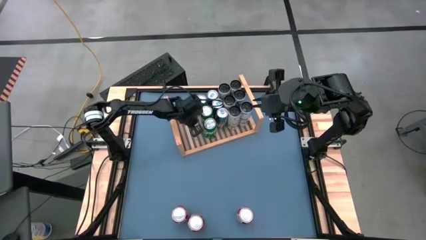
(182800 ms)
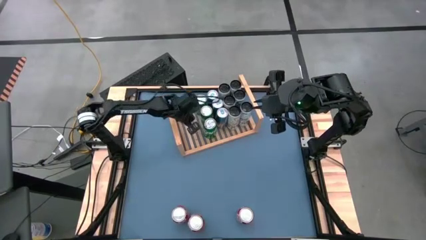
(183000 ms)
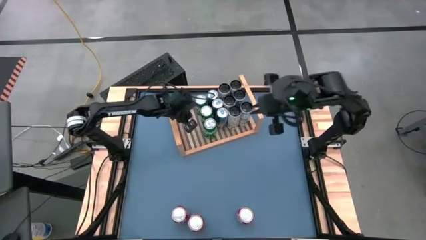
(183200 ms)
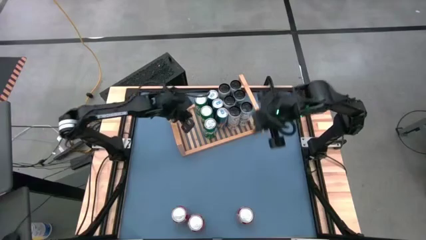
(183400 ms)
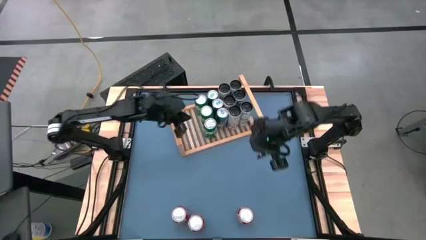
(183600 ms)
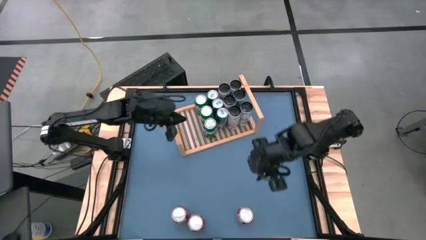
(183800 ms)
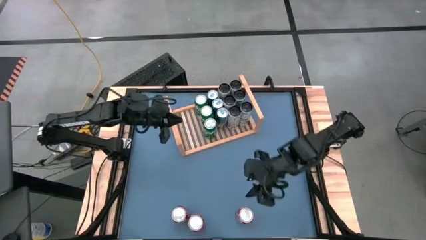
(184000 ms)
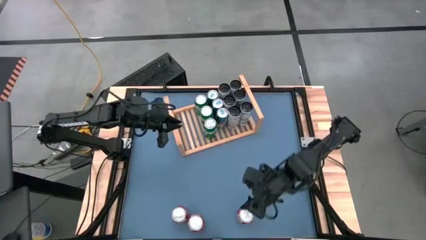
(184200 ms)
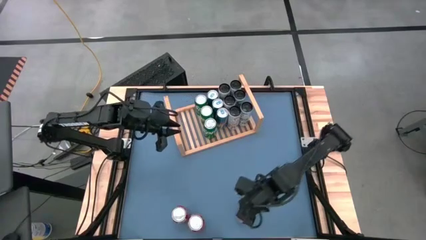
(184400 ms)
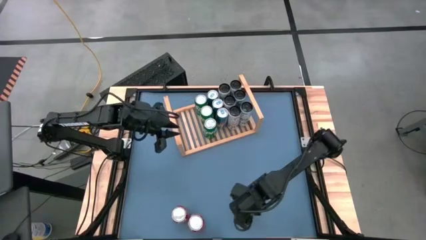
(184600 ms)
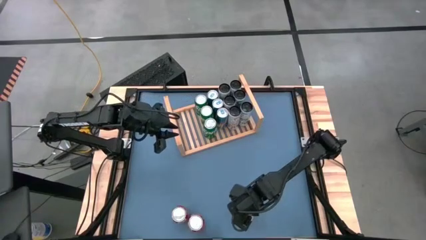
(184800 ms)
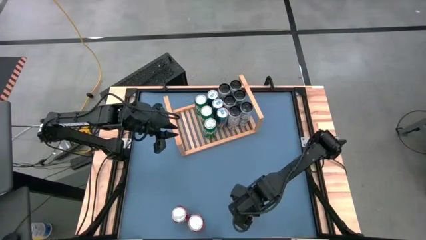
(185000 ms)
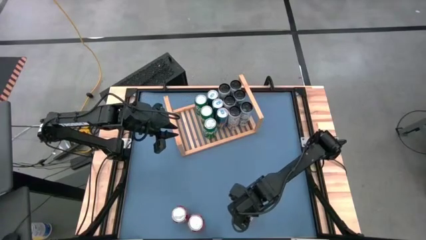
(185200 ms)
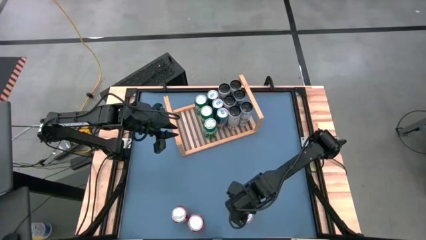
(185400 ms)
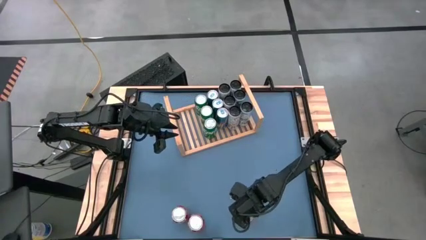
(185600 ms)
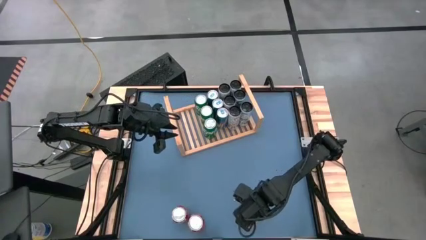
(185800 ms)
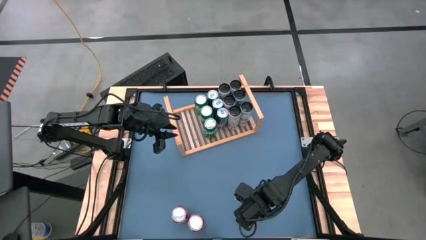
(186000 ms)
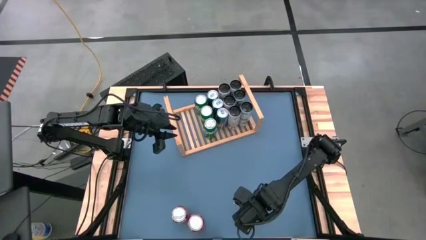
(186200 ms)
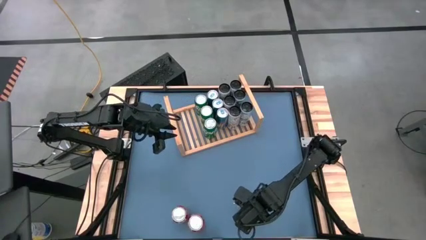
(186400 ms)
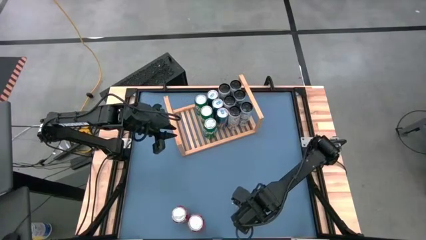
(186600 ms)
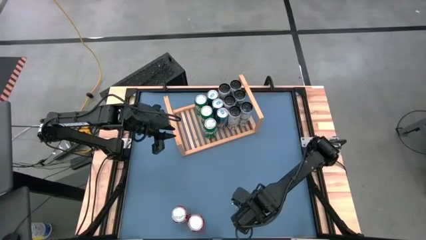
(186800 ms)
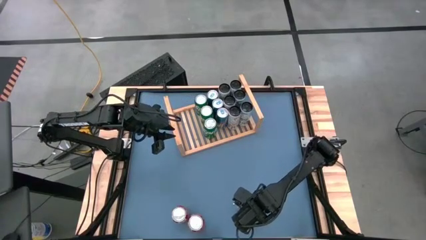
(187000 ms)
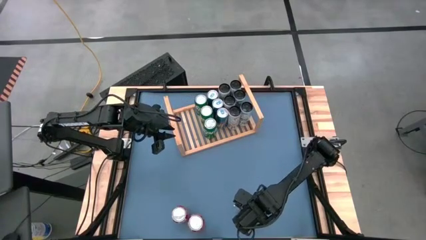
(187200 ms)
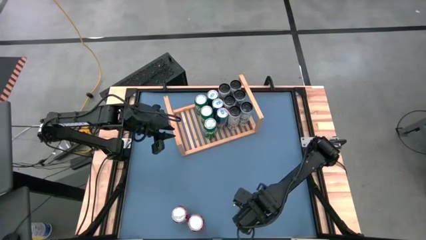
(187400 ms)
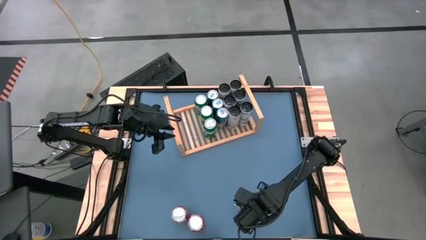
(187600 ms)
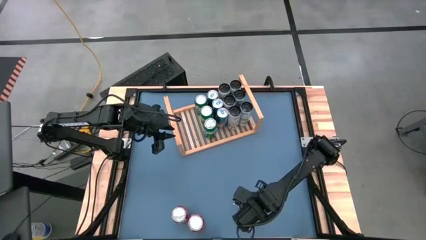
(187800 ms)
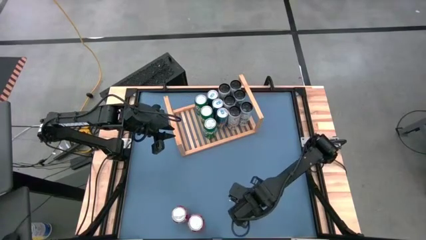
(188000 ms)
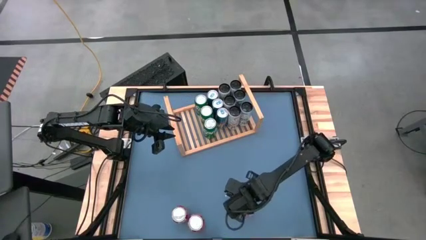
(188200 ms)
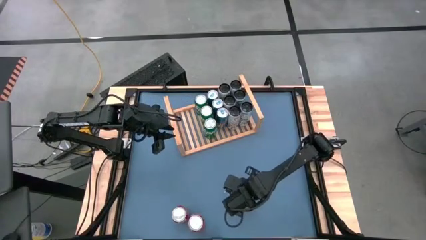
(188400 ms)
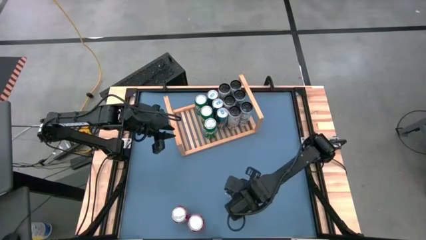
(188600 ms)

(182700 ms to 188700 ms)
Task: Place canned beverage on shelf
Put the red-white soda can on the shelf

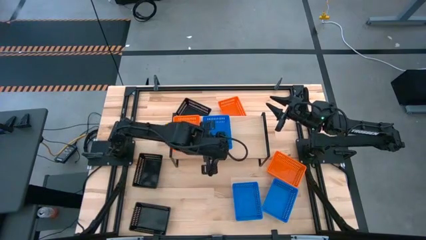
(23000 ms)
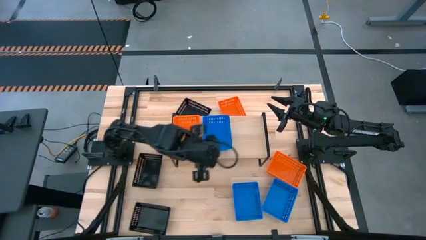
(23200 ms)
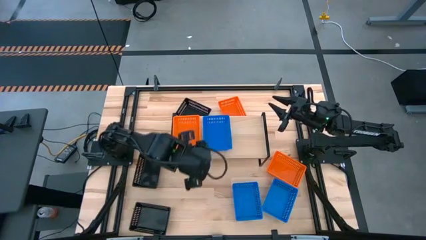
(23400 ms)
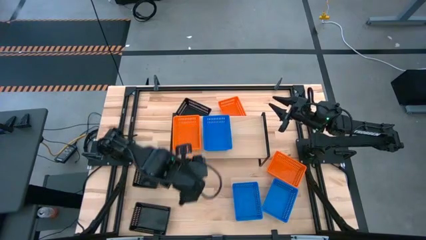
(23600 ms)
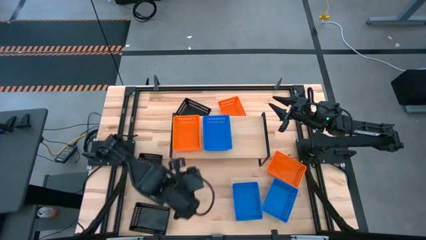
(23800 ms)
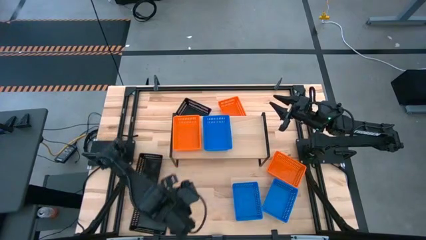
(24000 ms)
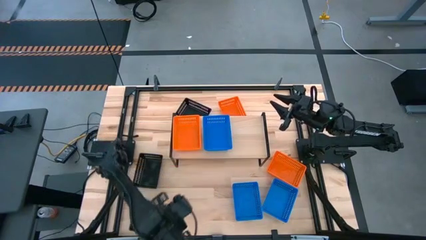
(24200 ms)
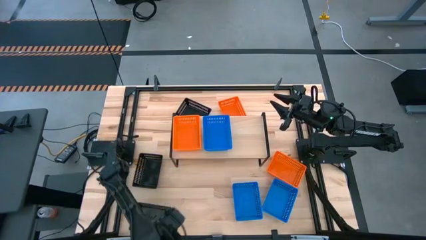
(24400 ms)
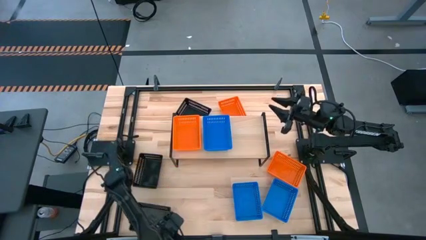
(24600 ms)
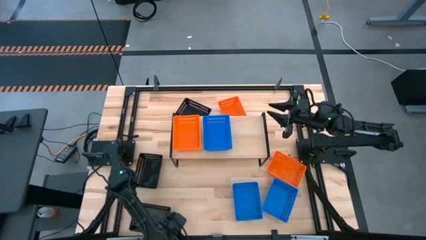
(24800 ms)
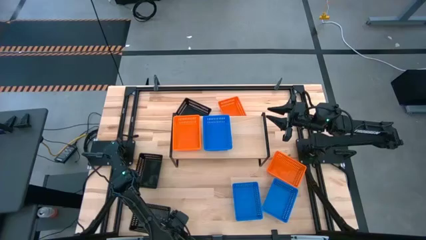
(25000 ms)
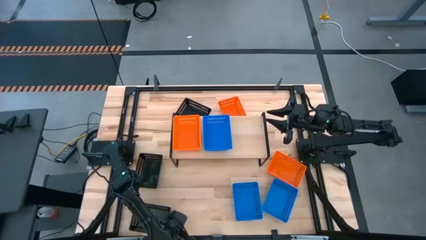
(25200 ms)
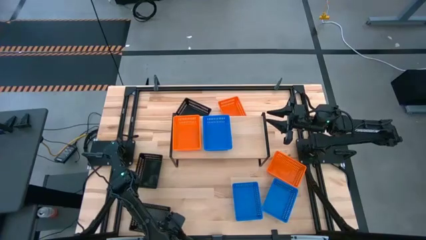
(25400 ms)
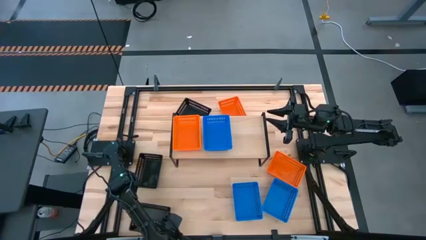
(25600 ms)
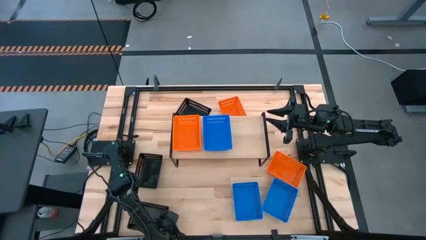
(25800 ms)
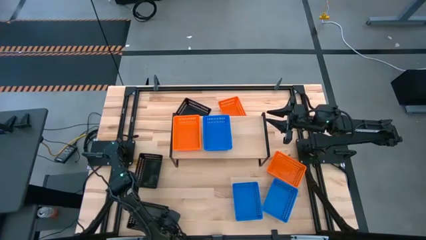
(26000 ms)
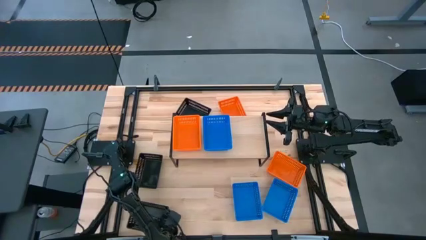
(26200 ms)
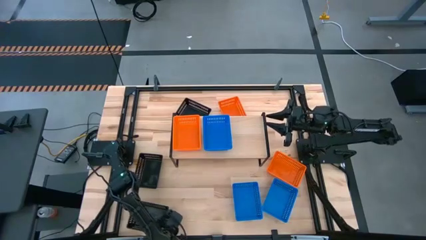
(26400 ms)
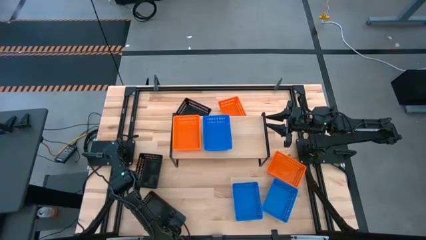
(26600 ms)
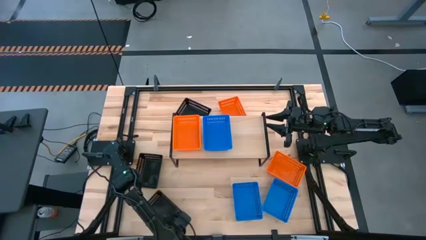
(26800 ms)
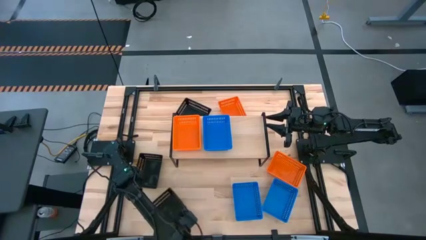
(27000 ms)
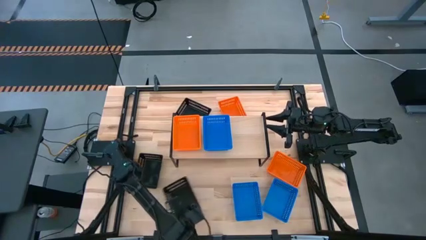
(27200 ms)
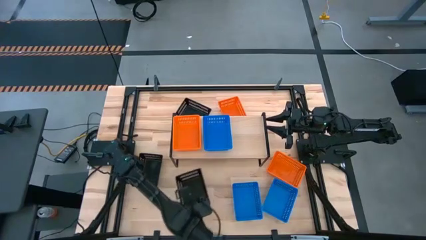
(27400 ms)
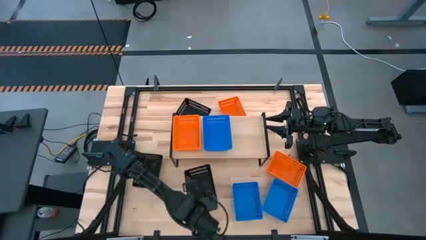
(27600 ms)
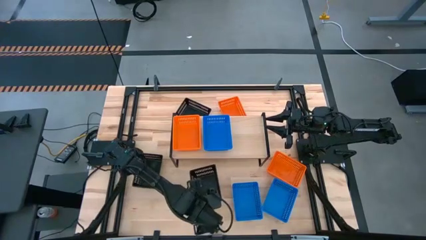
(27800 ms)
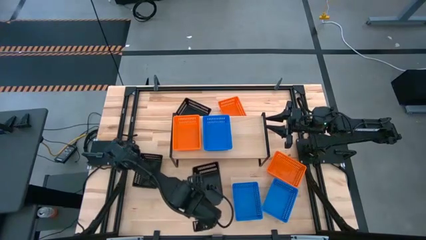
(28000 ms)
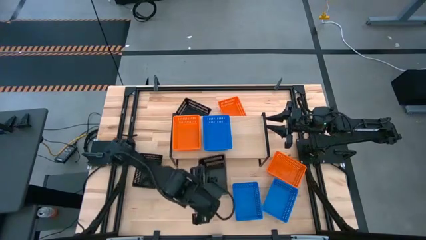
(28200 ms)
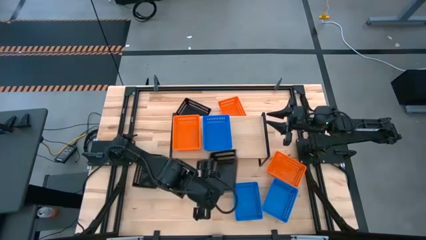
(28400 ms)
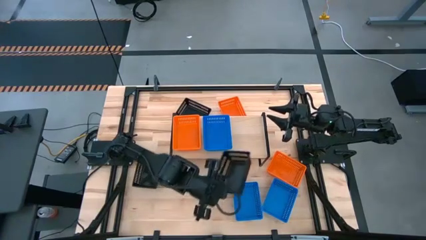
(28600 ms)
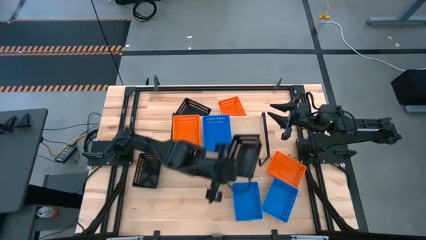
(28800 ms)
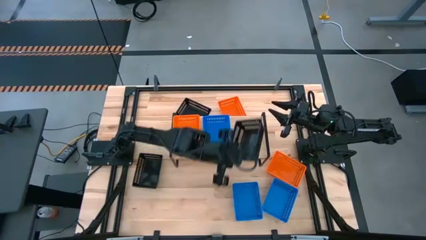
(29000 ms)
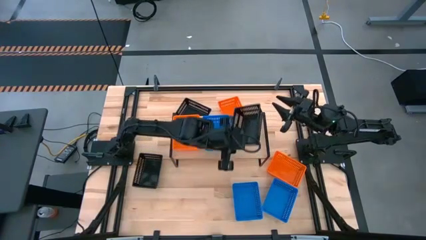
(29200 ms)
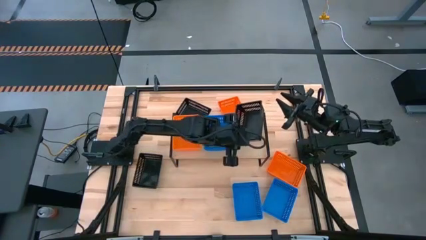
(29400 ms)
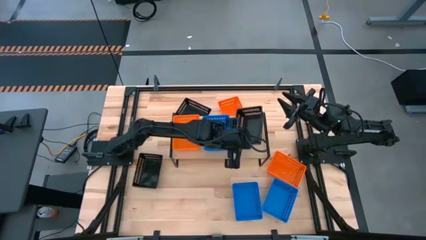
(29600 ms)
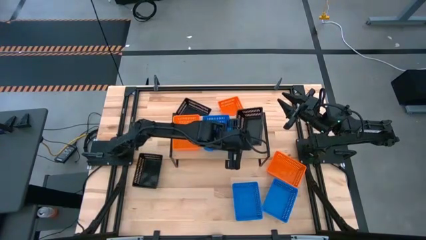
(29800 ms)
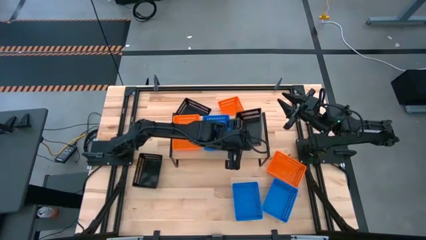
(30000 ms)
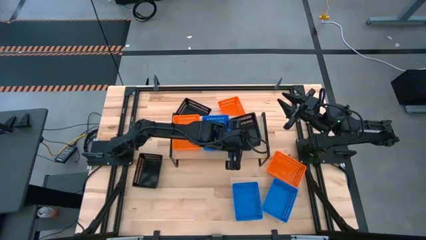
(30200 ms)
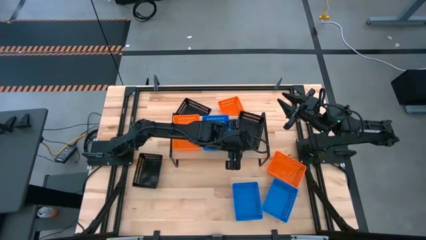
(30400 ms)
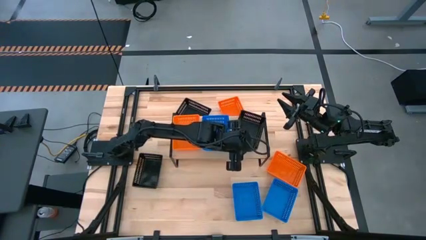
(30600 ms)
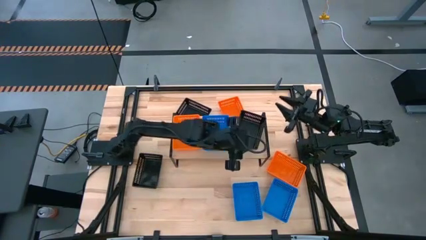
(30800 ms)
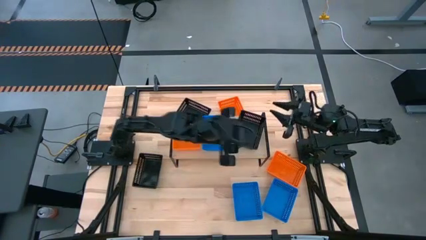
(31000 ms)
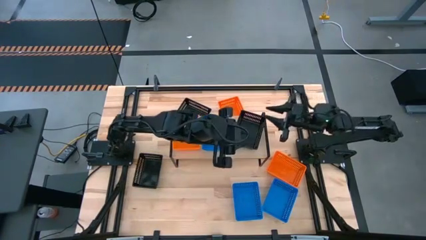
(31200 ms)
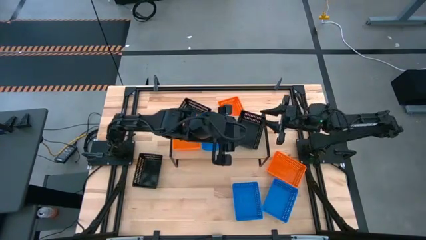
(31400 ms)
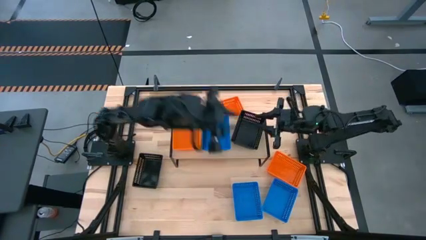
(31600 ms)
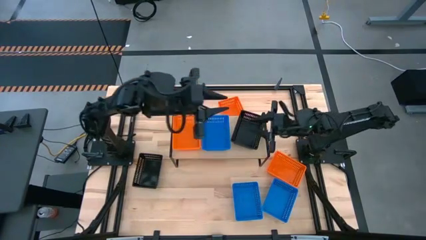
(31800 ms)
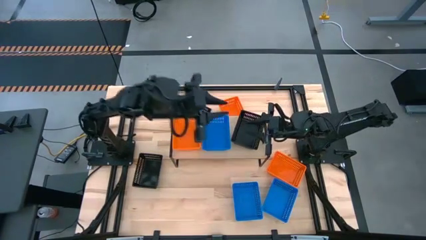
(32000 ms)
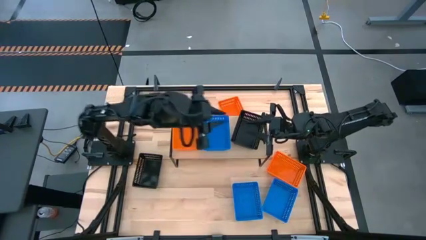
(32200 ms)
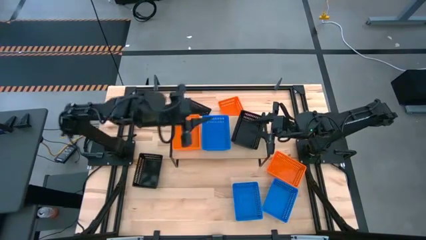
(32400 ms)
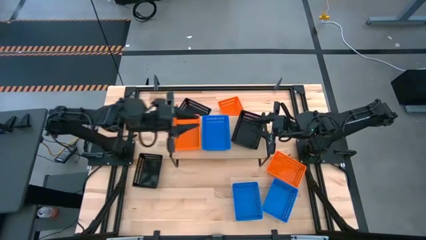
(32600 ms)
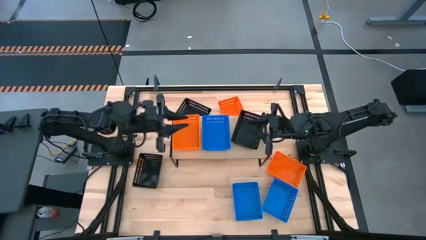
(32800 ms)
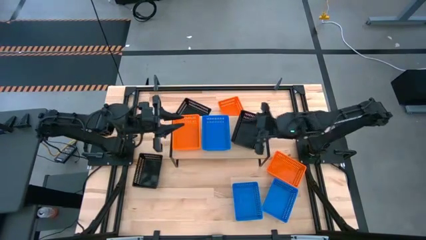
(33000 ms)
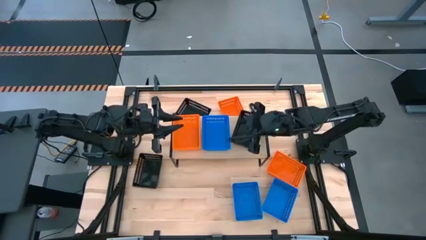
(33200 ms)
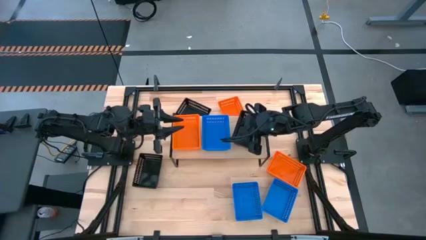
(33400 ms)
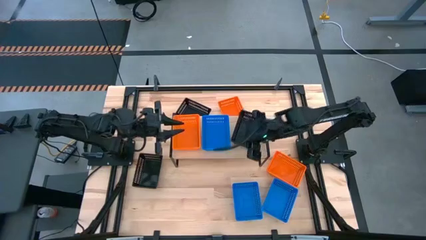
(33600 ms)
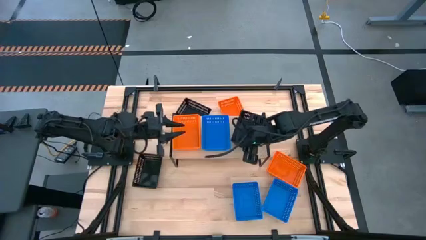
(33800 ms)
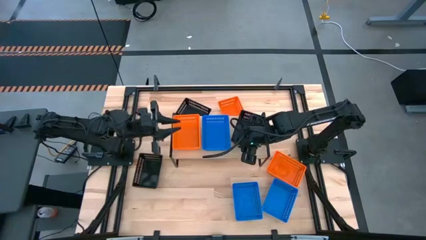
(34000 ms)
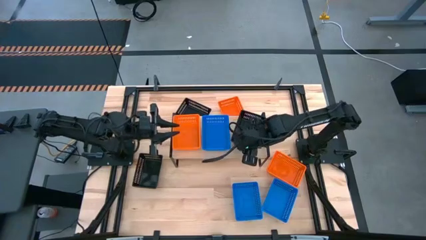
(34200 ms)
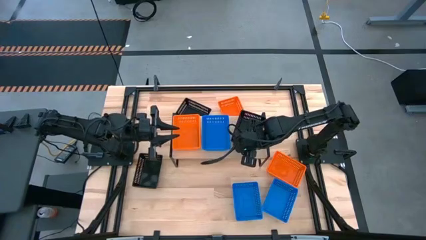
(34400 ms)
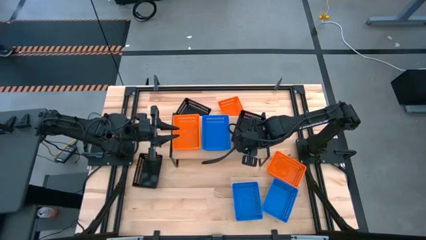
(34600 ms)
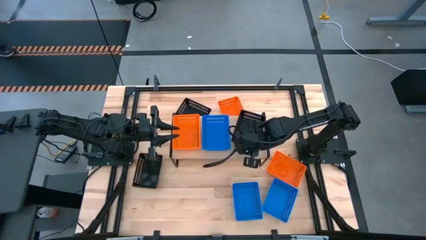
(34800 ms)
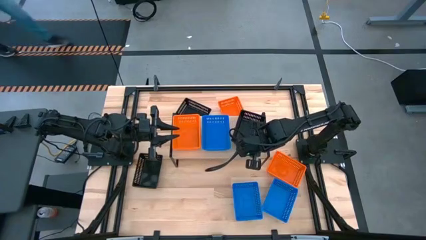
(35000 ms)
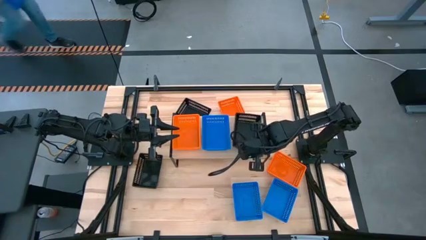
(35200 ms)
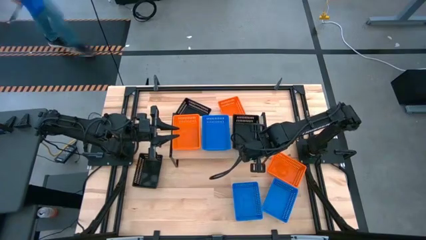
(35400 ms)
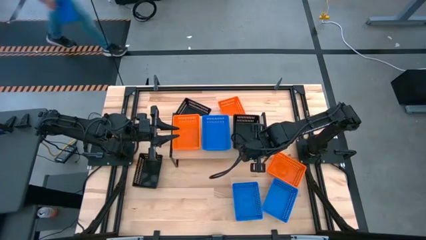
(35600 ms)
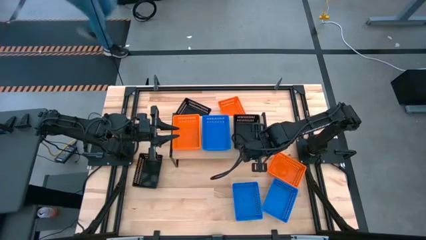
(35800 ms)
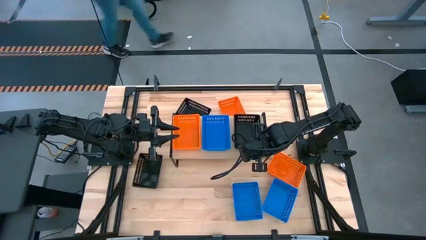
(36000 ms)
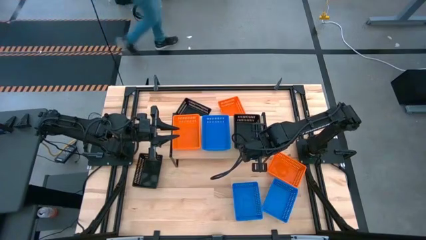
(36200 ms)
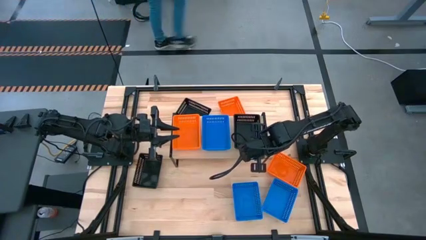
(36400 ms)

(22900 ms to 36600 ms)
Task: Stack baskets on shelf by color
Put the bottom black bin on the shelf
